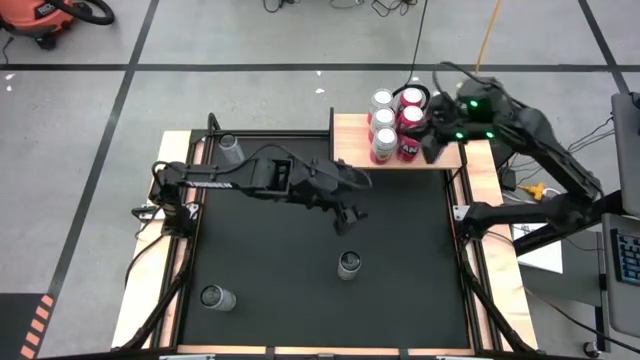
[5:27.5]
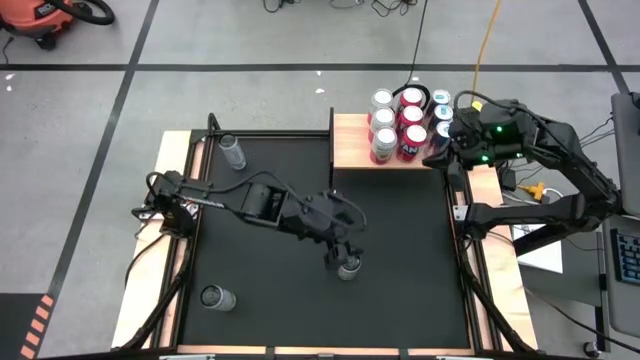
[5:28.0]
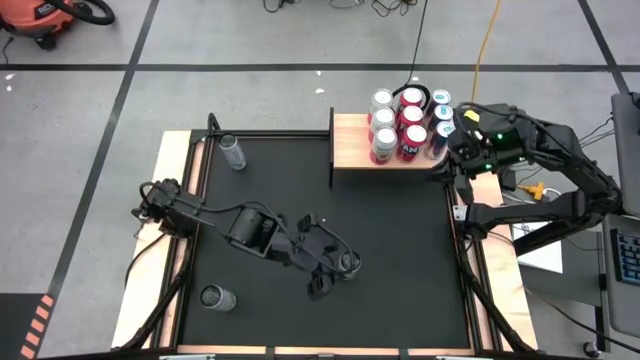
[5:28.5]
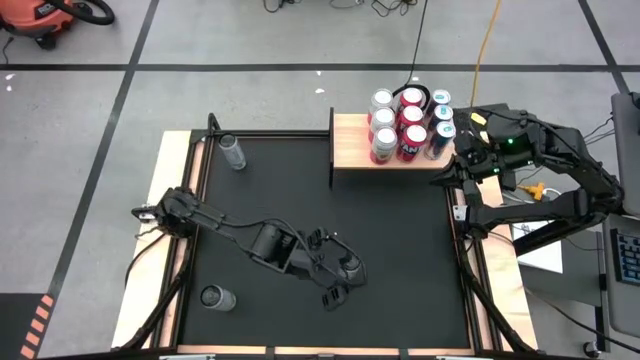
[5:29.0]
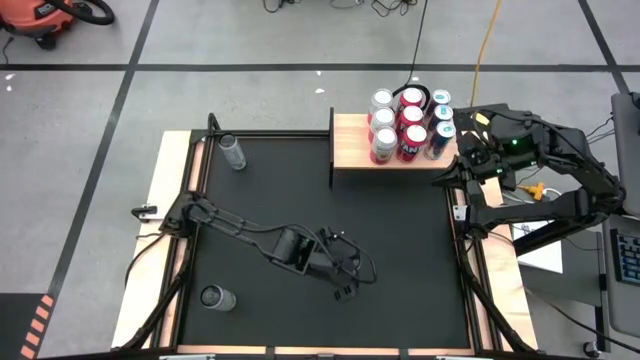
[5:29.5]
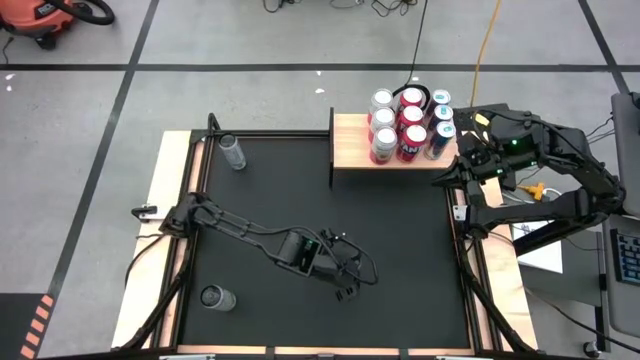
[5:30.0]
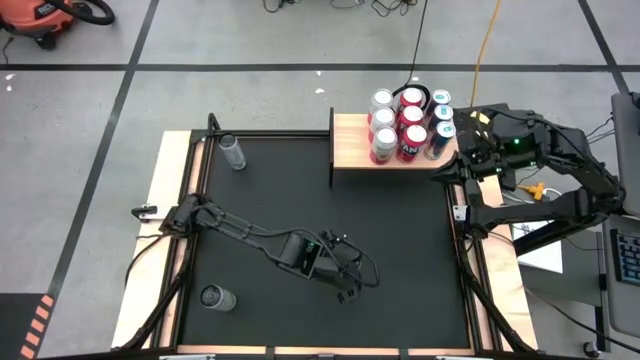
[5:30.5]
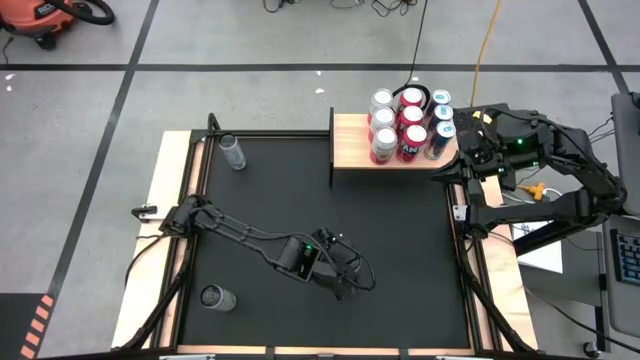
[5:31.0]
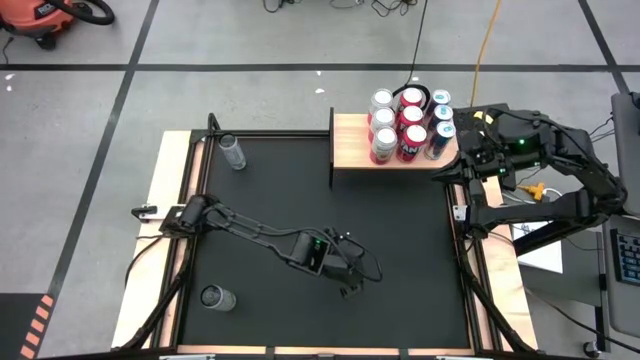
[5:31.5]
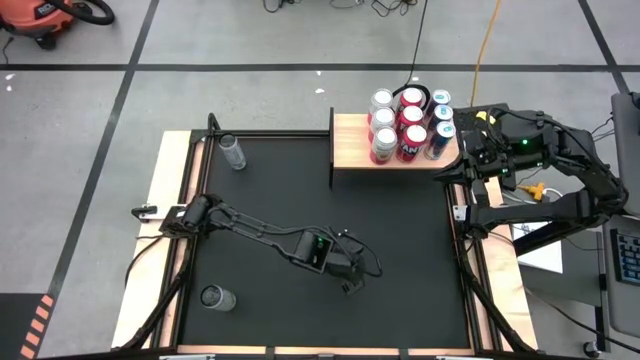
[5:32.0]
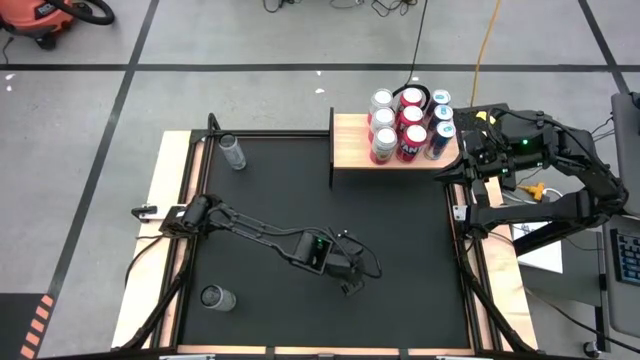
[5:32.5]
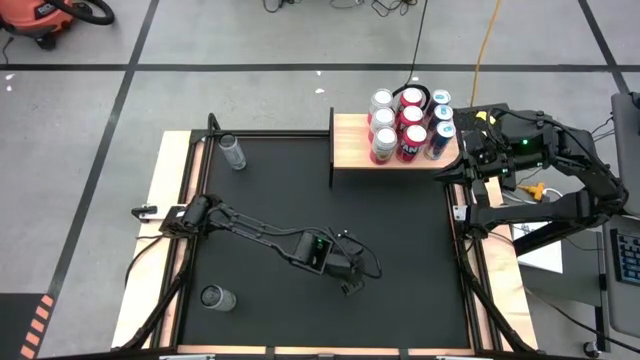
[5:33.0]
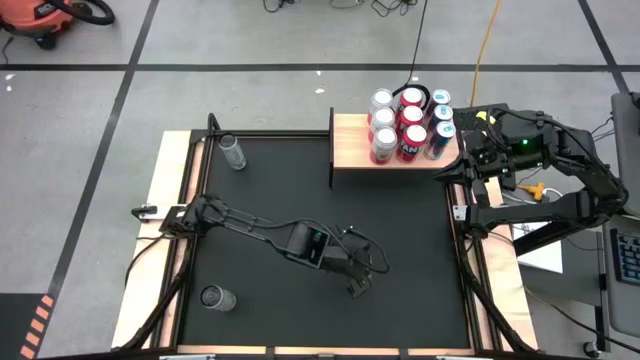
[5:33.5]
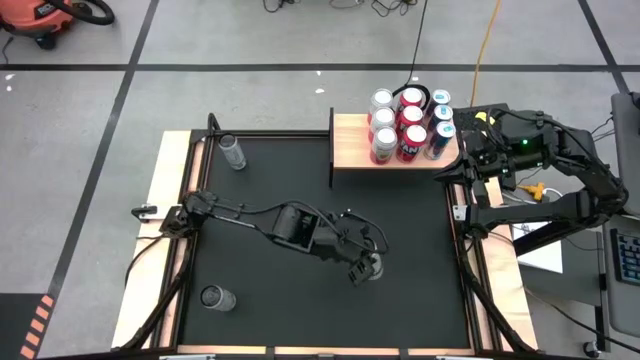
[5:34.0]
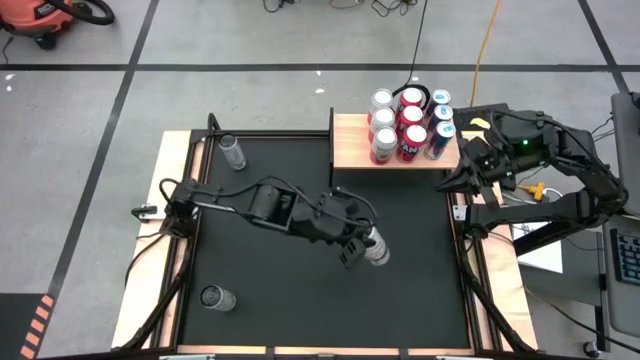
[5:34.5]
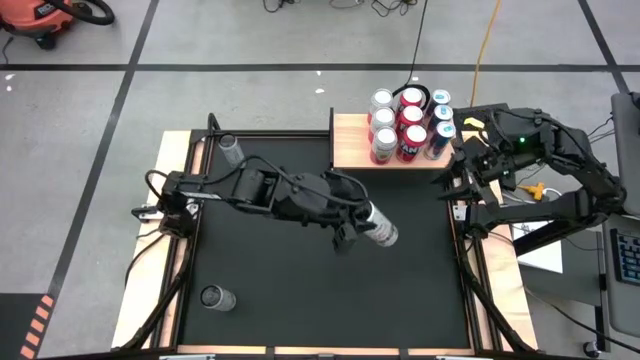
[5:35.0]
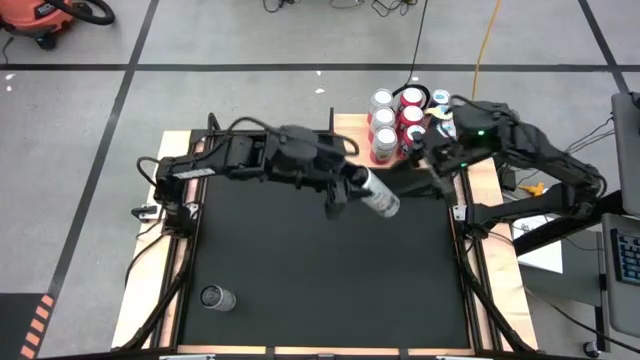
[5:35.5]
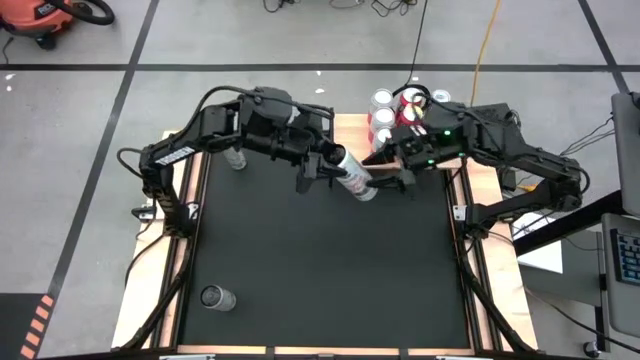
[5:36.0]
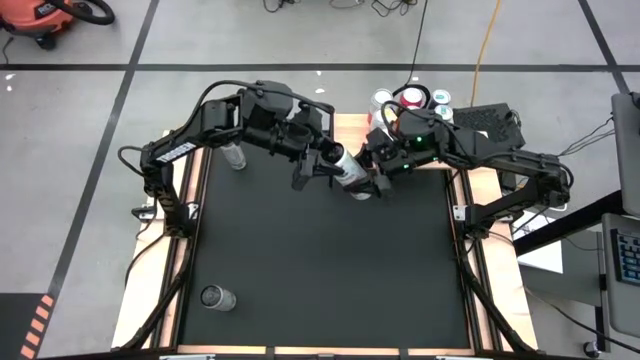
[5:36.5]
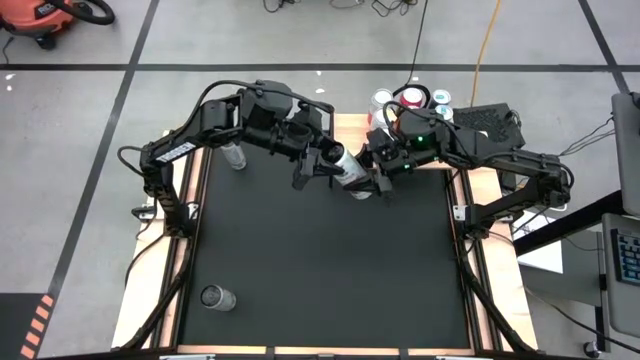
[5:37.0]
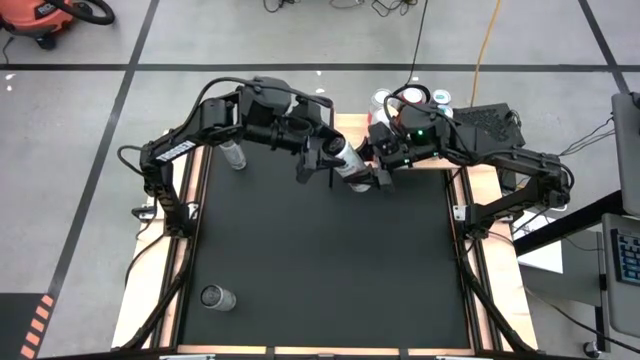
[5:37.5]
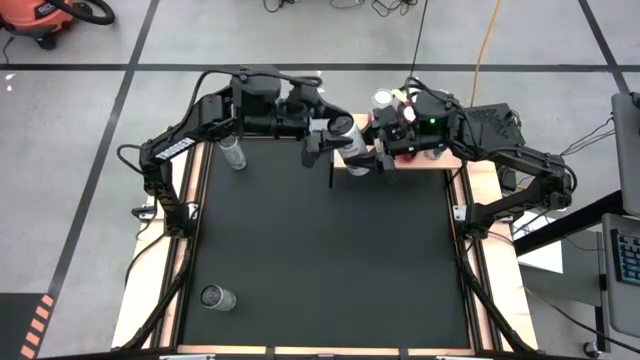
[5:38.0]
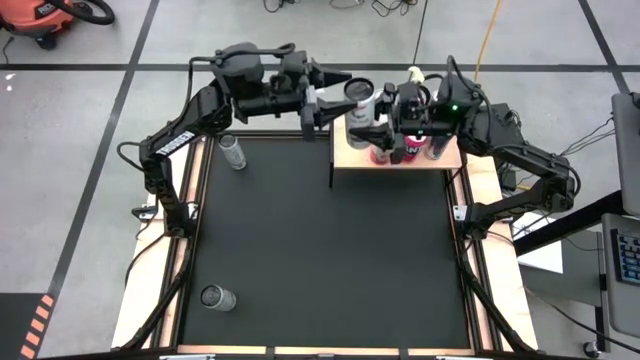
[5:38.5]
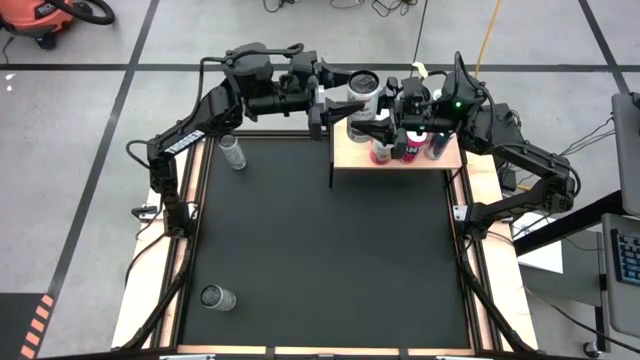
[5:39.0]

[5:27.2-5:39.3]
Task: Place canned beverage on shelf
Put the middle white yellow soda can on the shelf

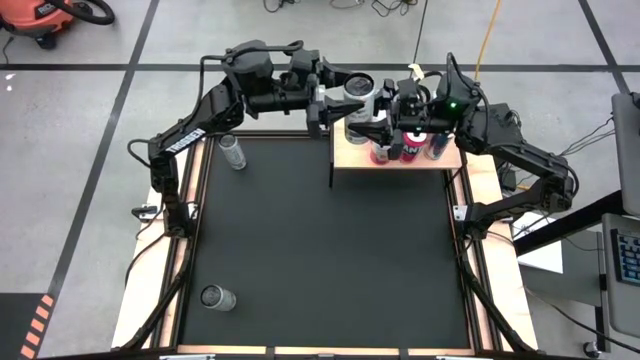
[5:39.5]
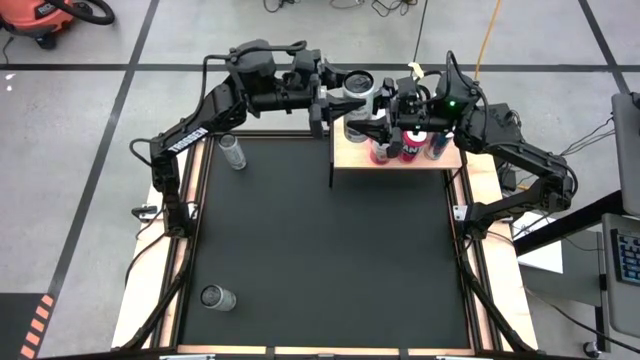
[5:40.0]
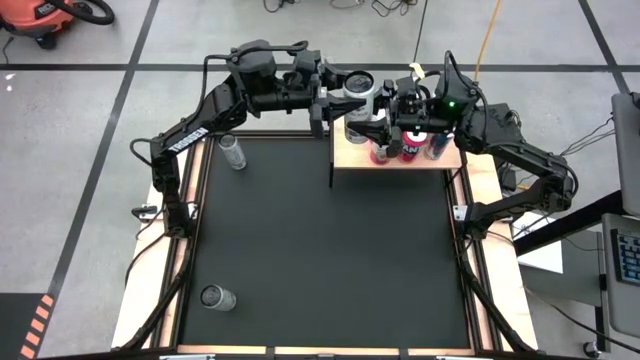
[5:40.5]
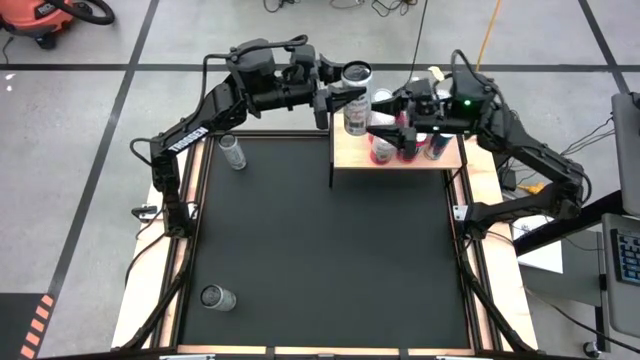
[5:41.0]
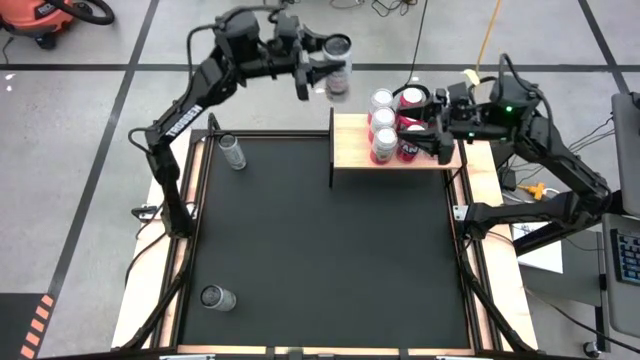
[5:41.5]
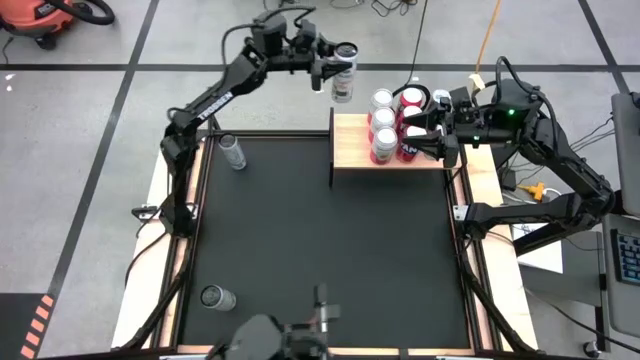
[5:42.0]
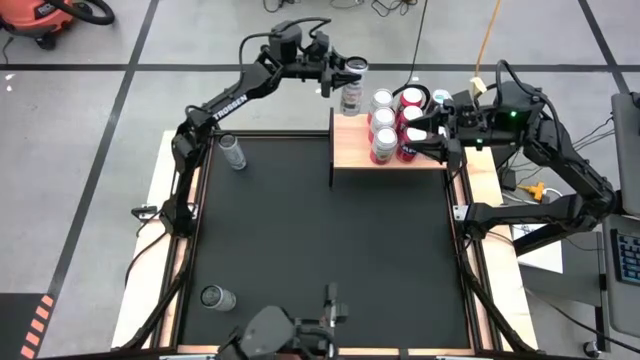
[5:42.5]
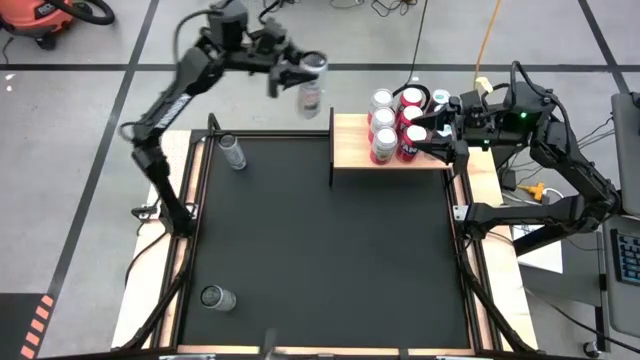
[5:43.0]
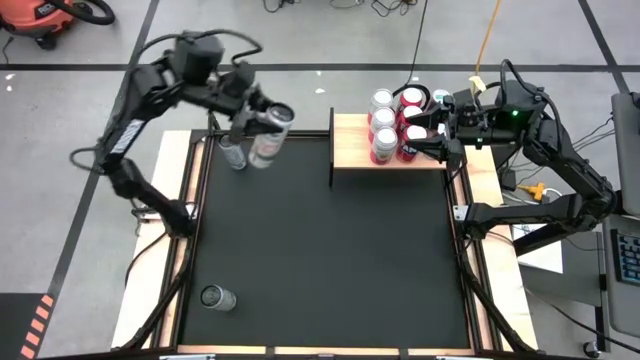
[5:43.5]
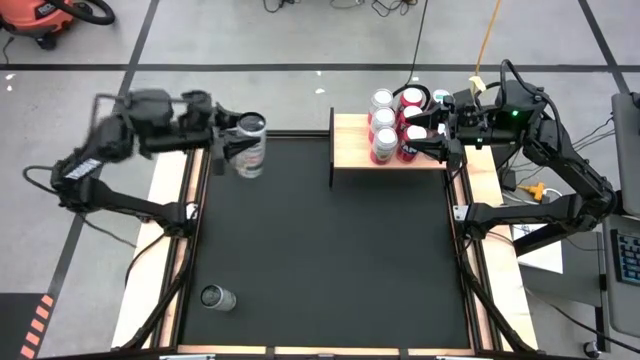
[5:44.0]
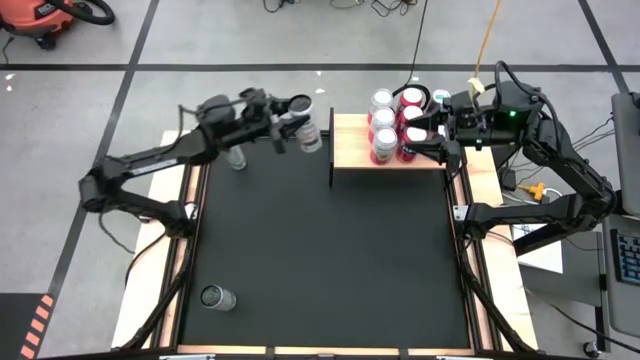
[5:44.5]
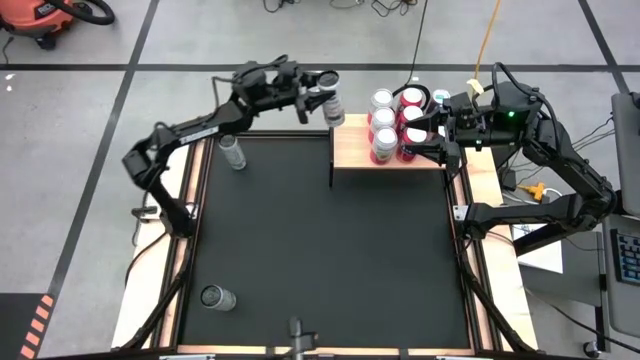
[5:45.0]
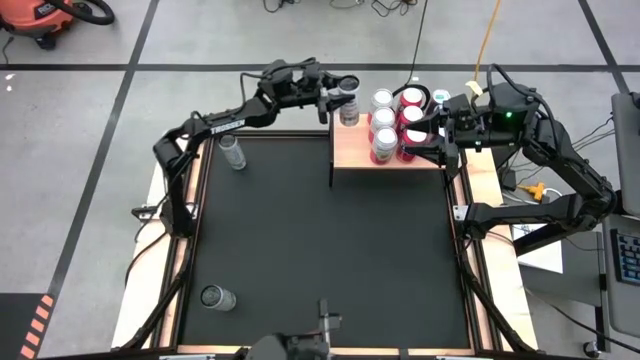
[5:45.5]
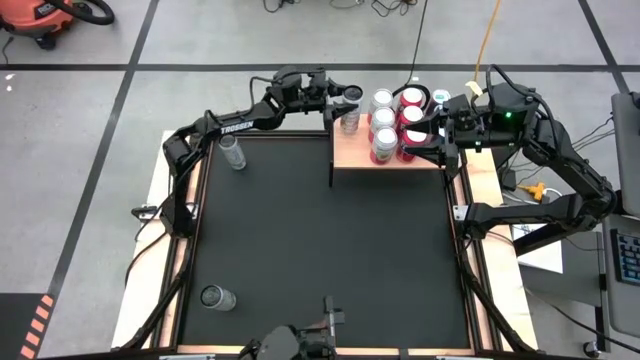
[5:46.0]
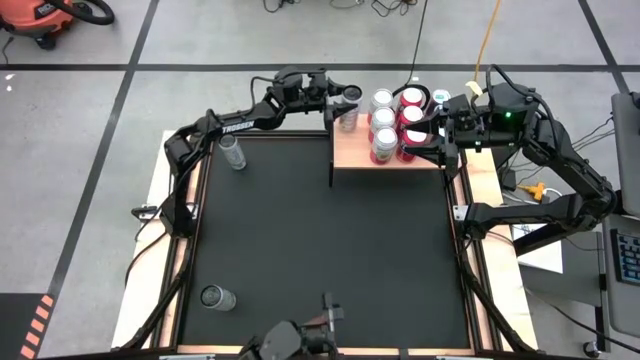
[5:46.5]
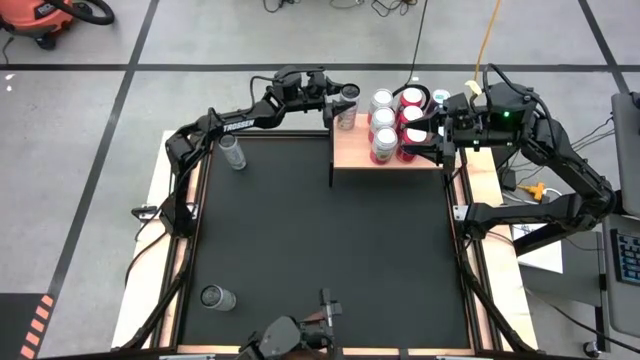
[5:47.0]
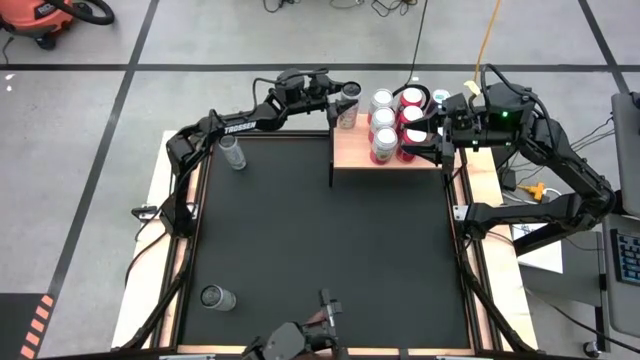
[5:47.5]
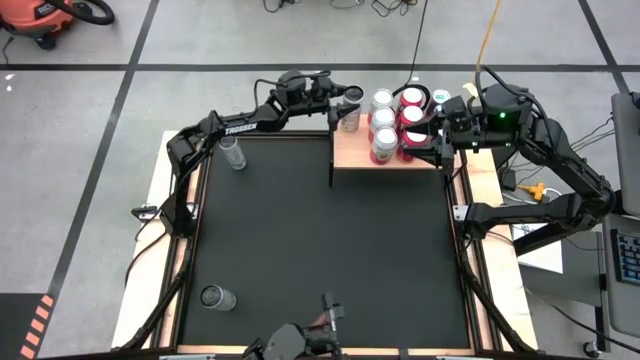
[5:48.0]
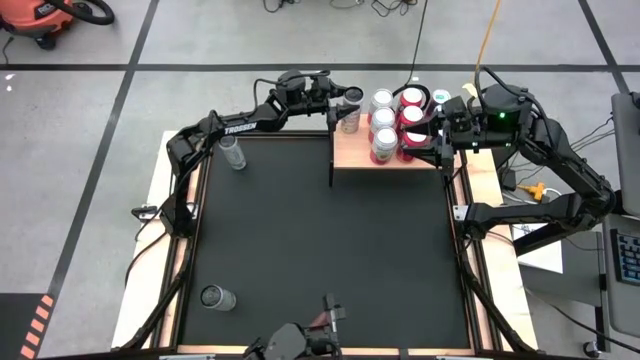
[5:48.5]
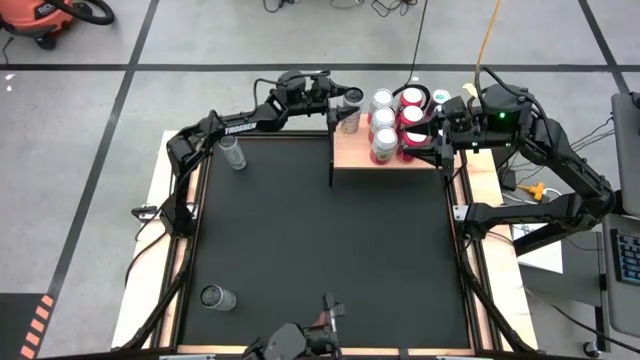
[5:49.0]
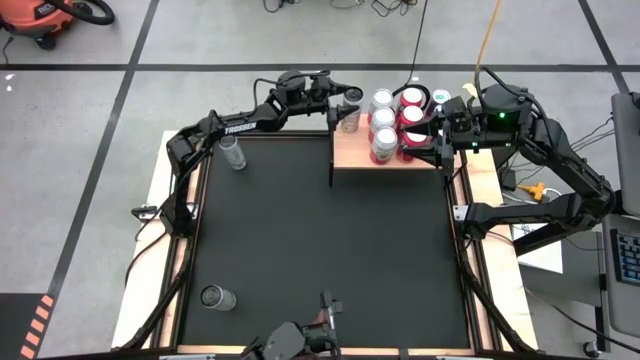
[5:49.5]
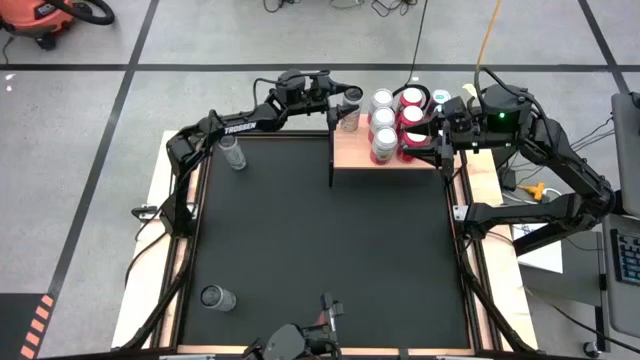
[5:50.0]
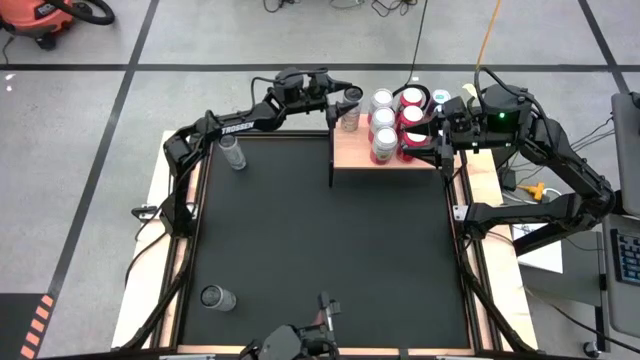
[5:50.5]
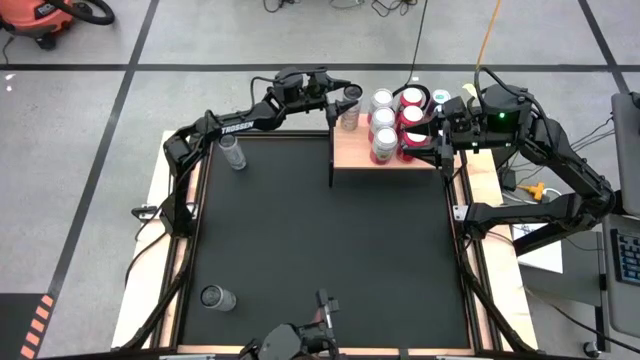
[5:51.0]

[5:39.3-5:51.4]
Put the middle white yellow soda can on the shelf
